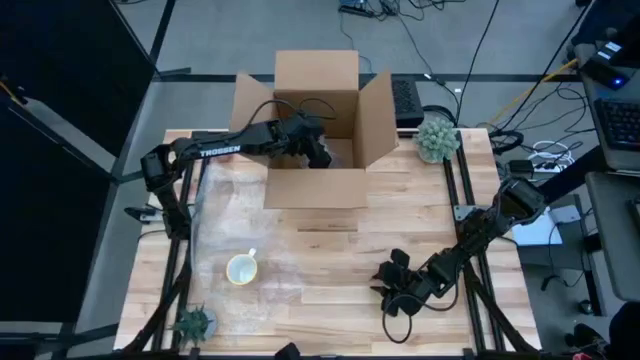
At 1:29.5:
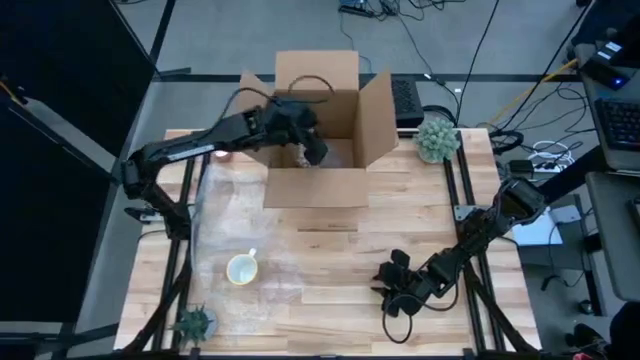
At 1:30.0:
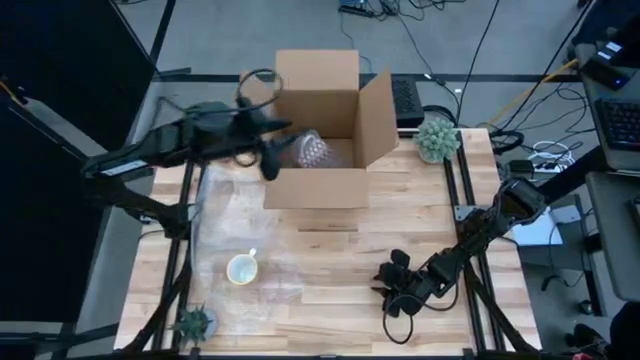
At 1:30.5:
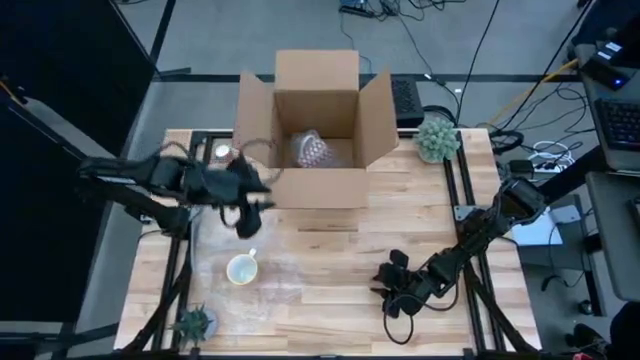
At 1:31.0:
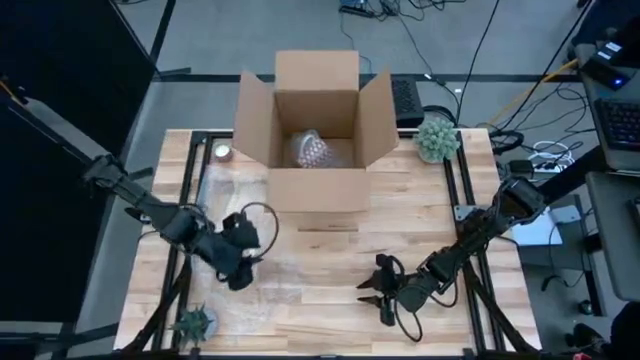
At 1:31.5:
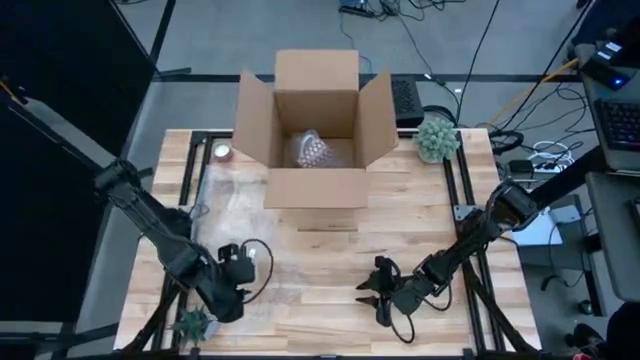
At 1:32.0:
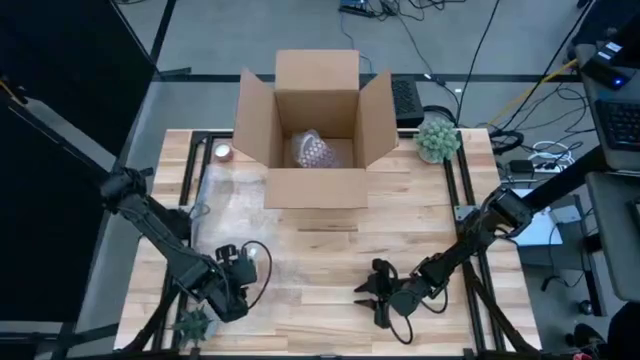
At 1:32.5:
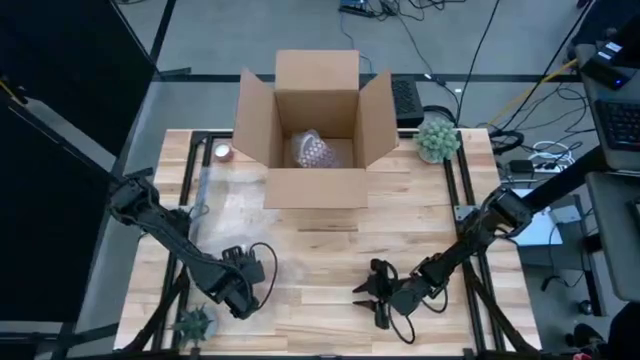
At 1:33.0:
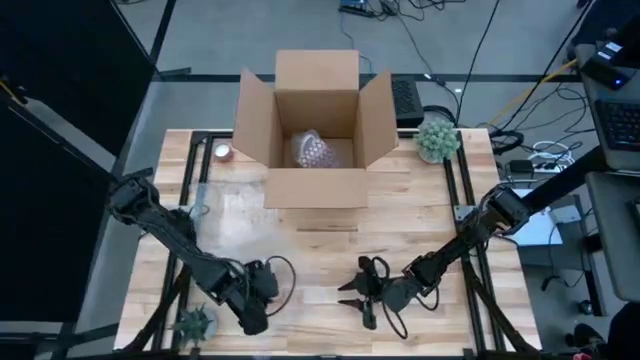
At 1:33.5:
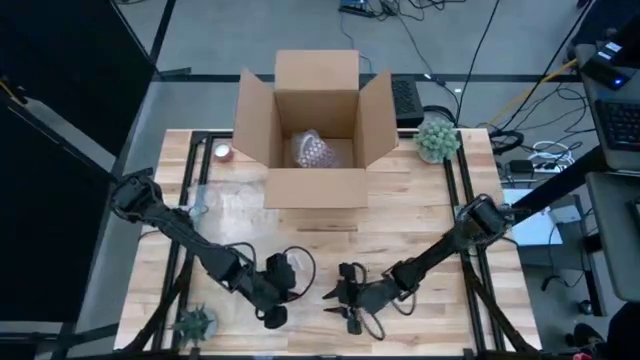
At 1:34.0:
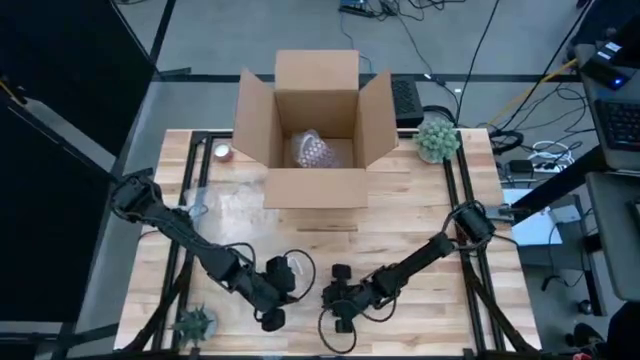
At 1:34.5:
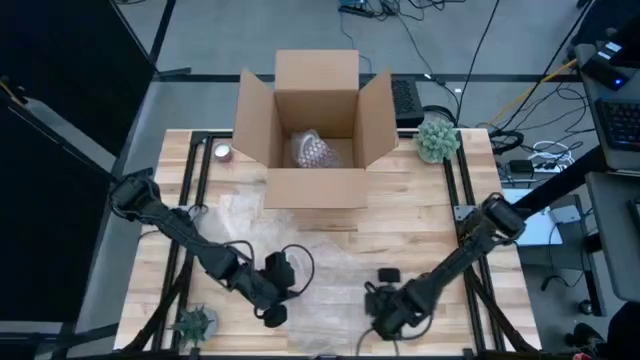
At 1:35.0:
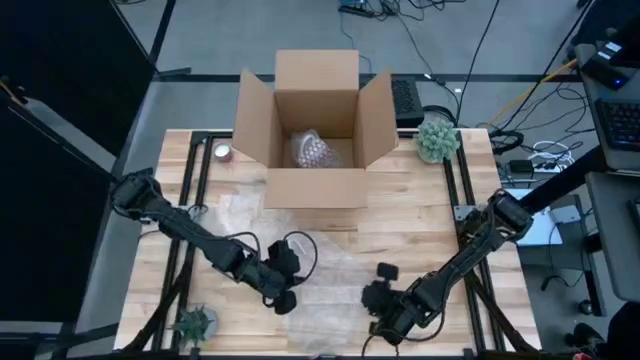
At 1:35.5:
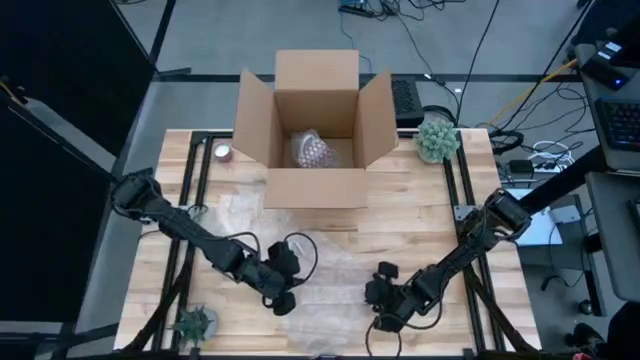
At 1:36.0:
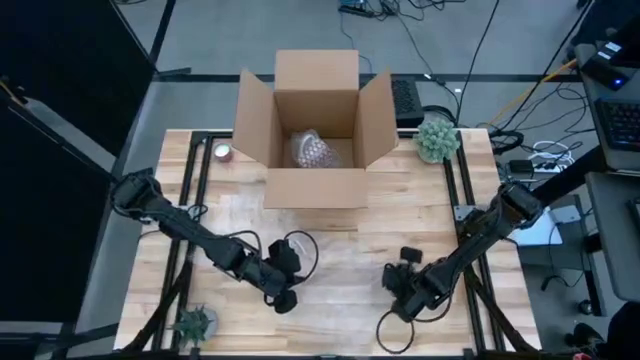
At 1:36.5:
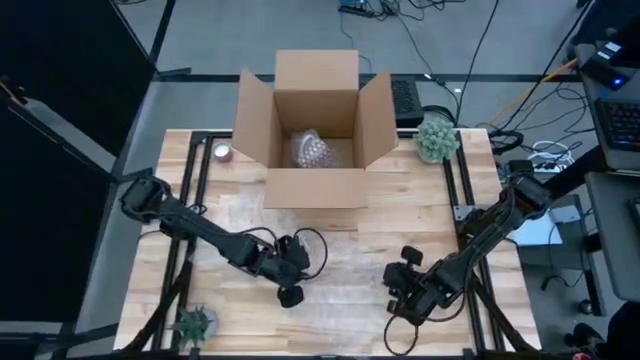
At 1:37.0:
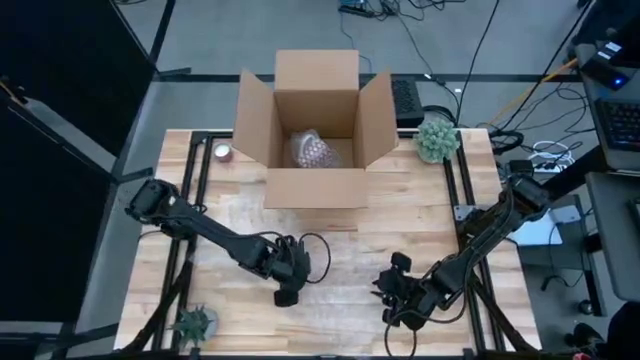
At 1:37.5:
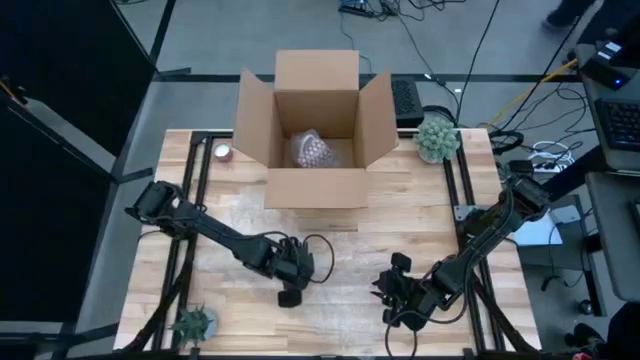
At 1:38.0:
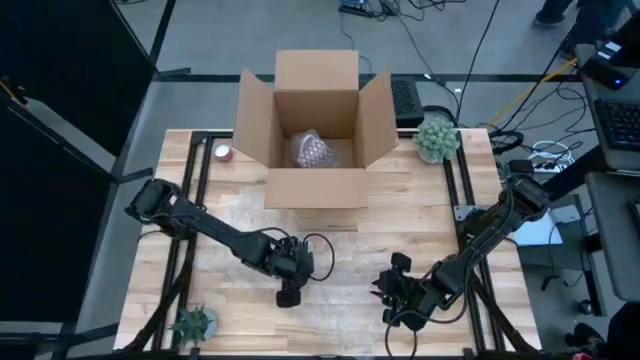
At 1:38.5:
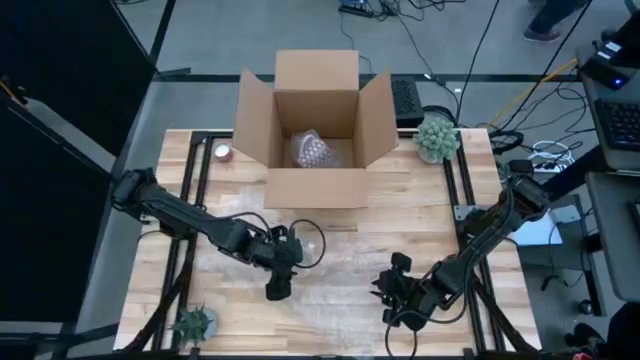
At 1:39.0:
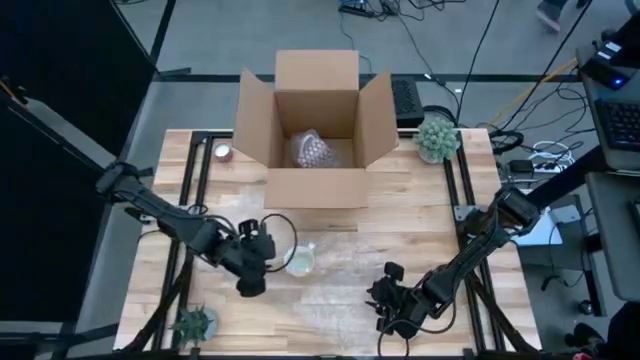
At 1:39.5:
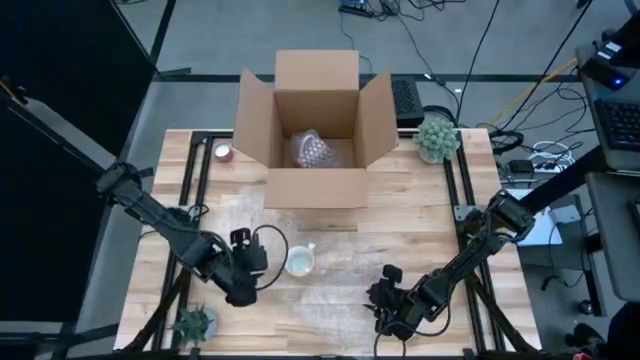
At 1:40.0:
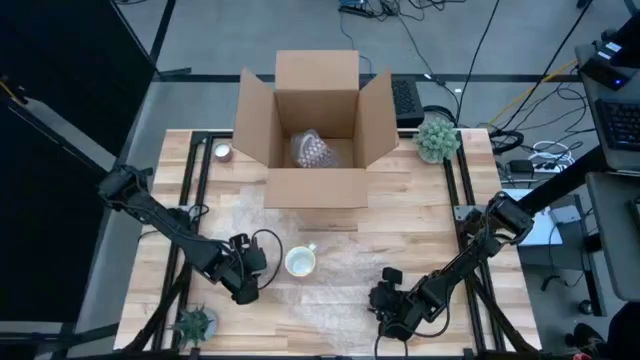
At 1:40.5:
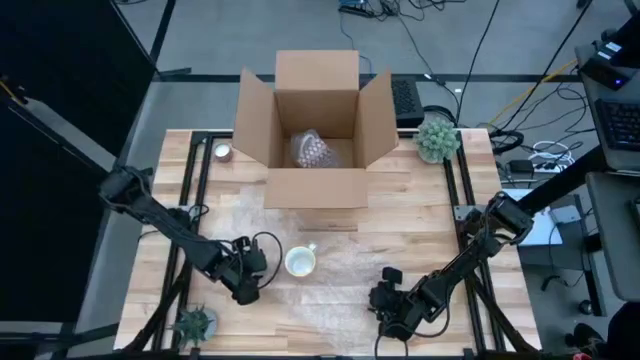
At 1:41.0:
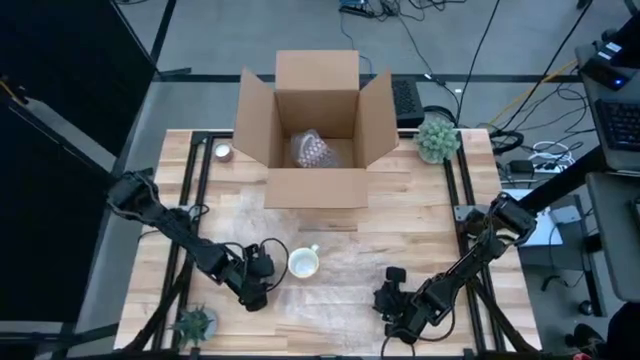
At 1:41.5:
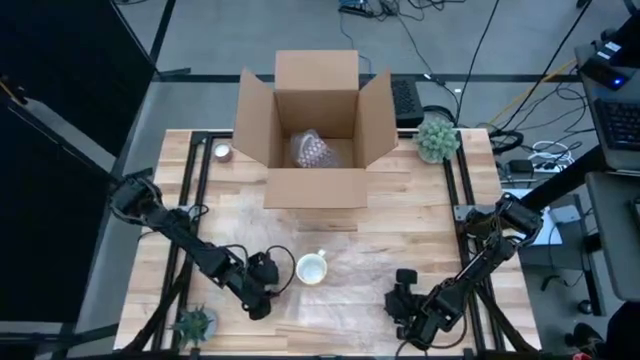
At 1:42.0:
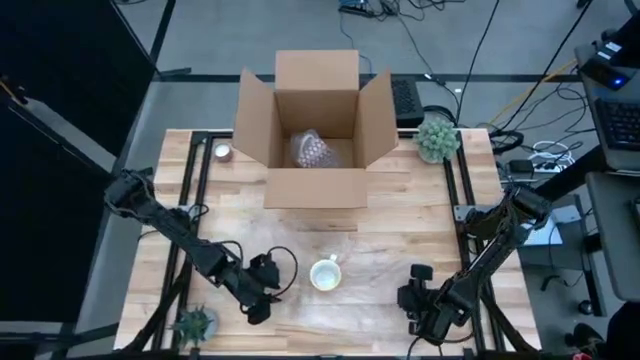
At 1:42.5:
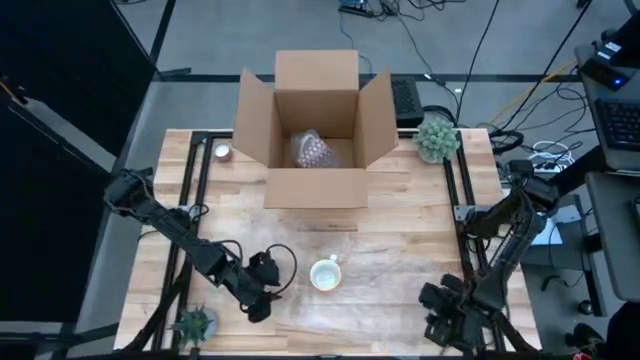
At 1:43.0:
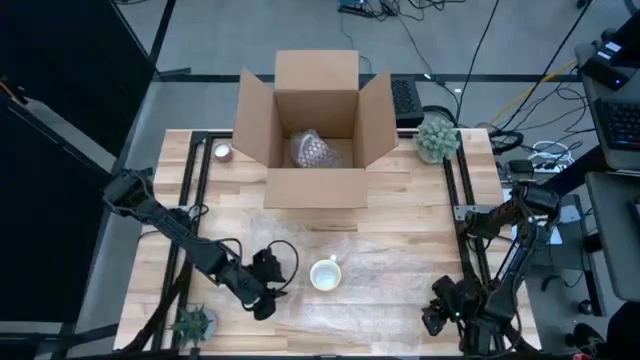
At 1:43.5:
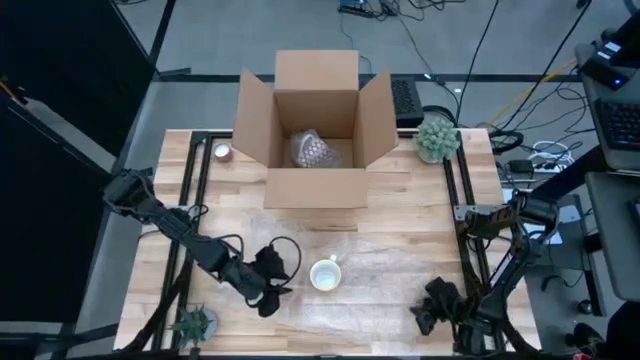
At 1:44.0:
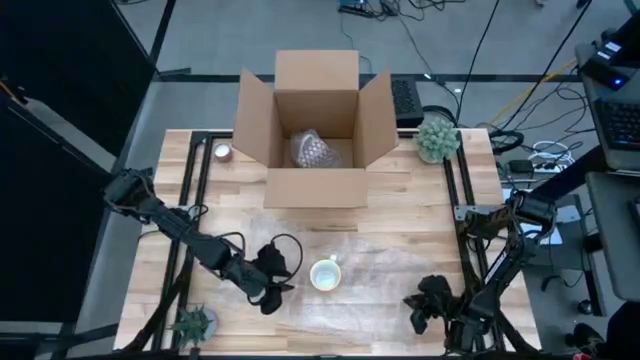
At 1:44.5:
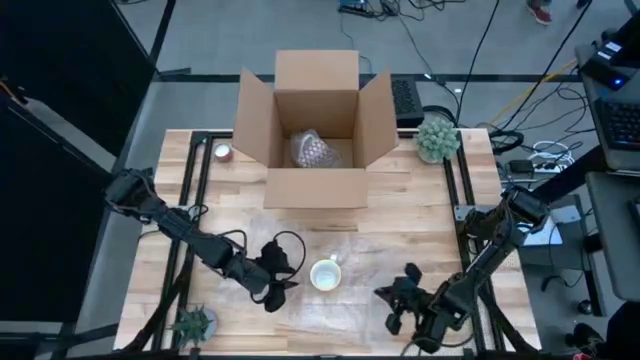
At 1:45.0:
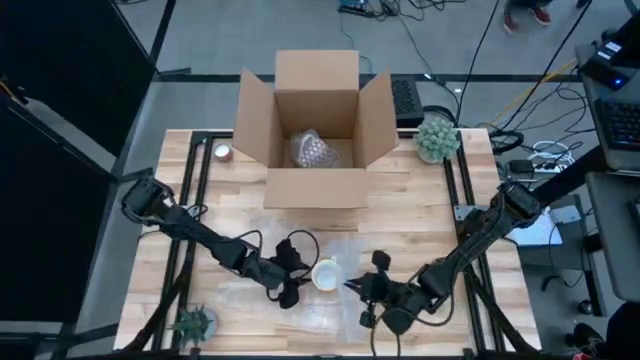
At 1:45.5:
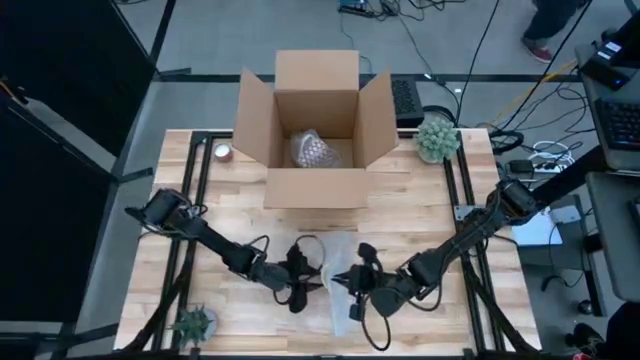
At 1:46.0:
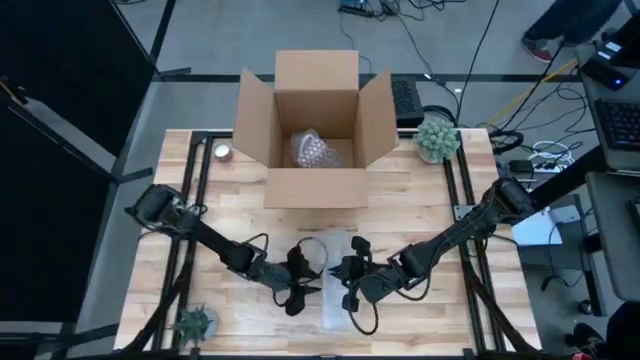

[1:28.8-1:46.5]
Task: wrap mug
Wrap the yellow mug with the bubble wrap

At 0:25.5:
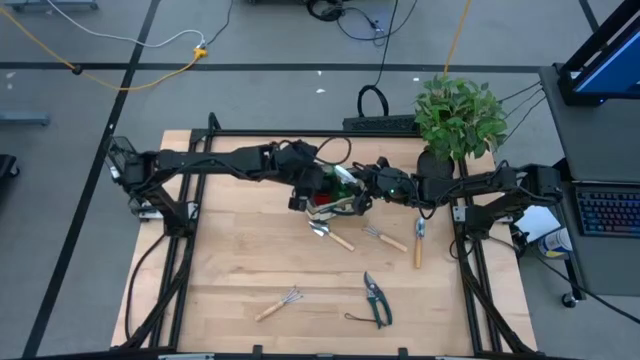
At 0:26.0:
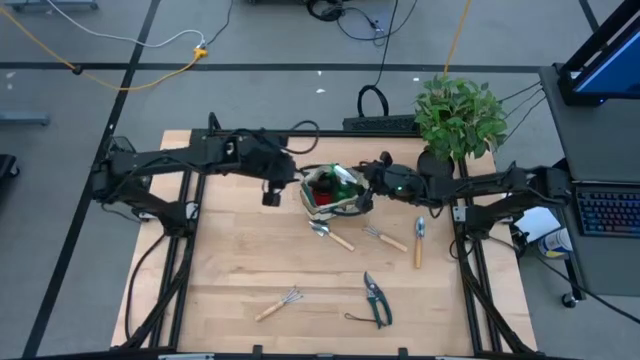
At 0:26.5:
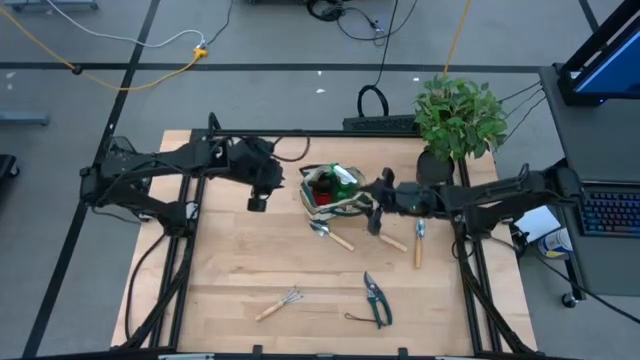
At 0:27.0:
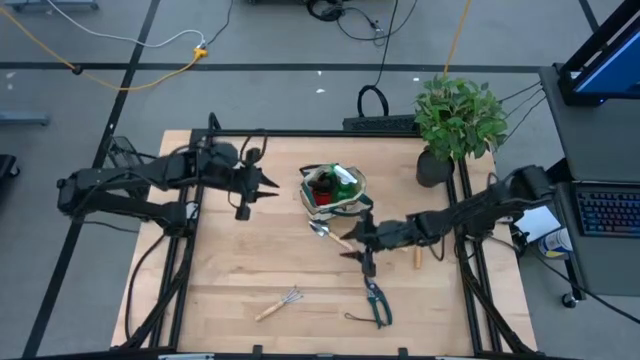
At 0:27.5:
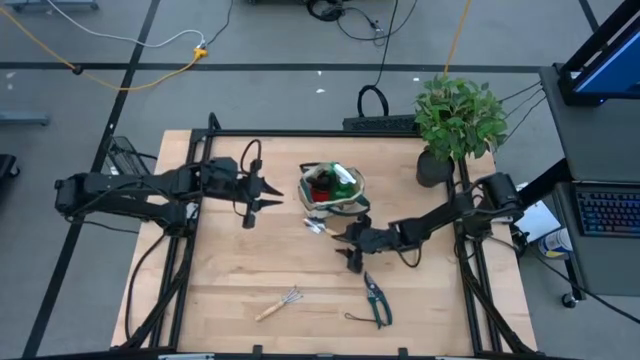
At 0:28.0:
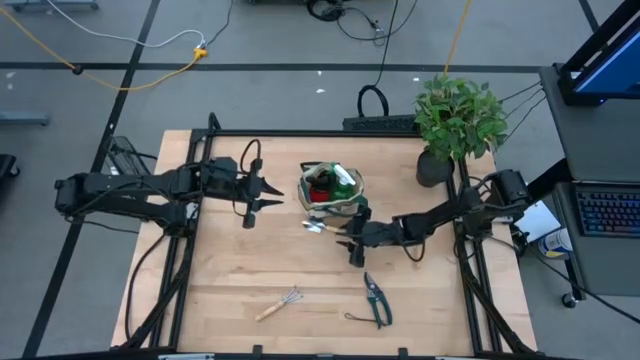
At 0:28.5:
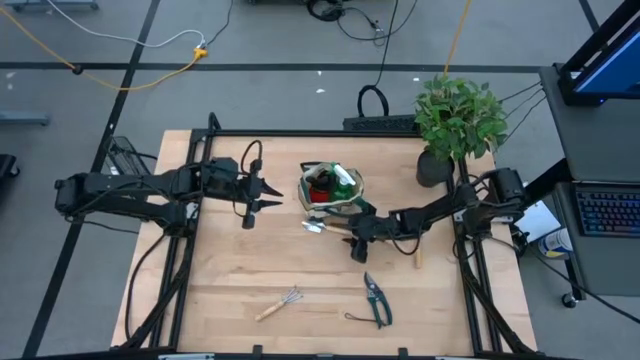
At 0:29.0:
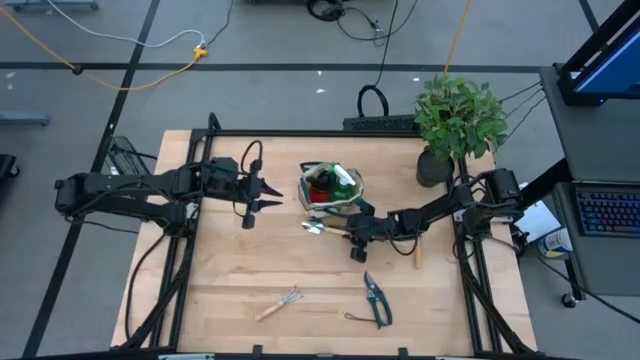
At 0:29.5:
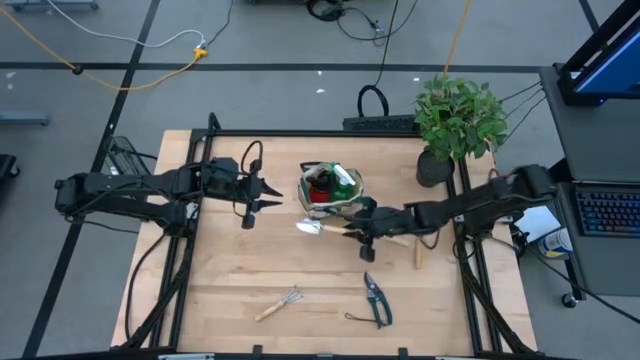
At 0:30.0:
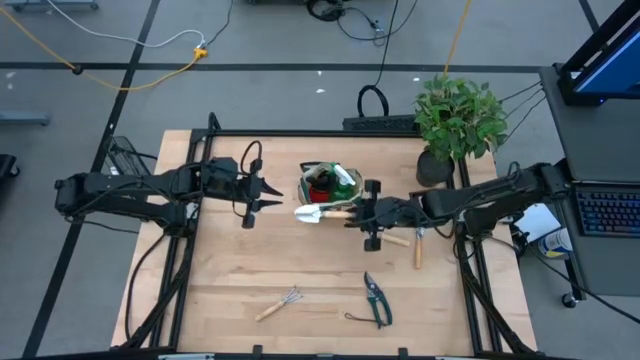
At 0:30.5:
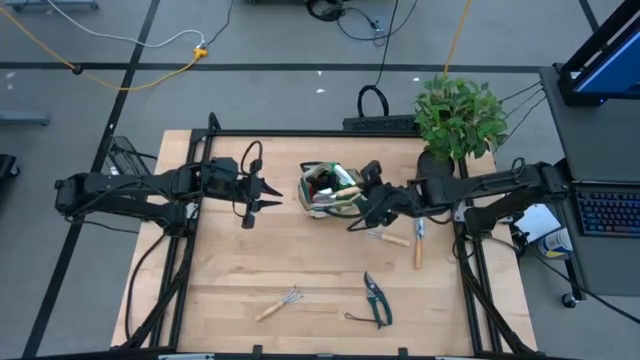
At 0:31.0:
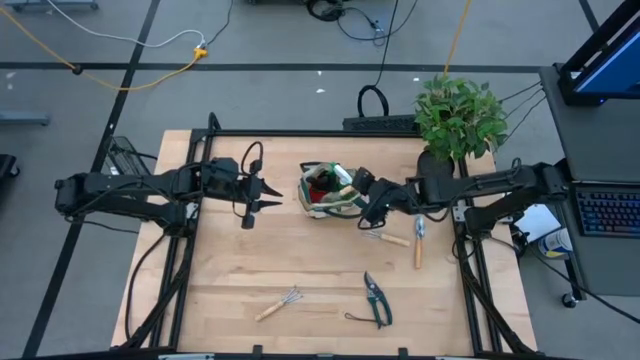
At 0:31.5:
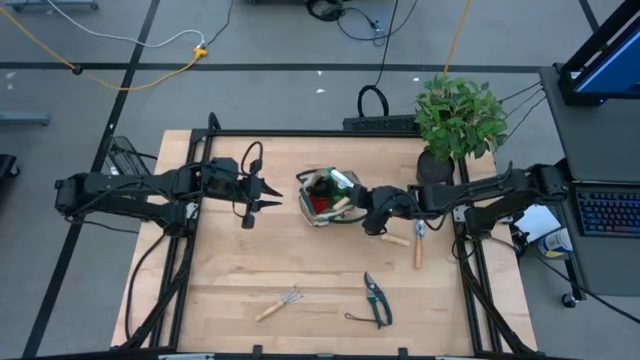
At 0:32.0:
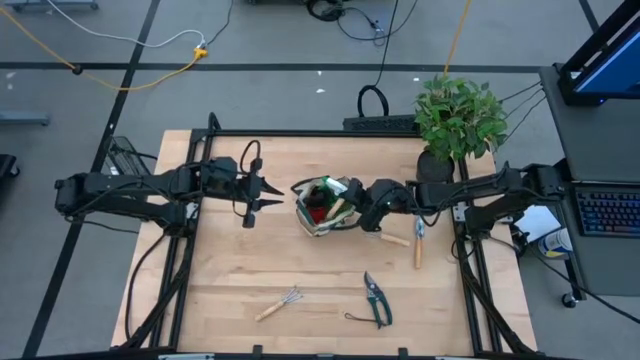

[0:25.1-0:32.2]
Task: Pick & Place Garden tools in Gardening bag
Put the left brown trowel into the green gardening bag
